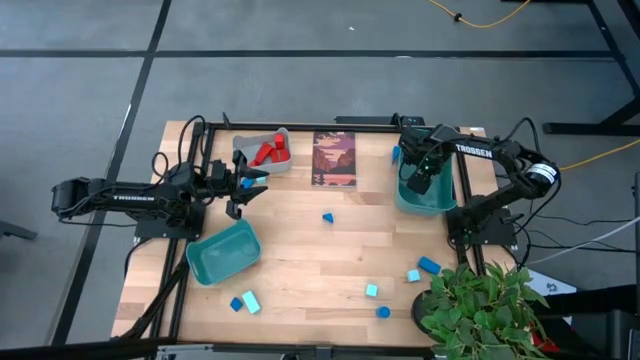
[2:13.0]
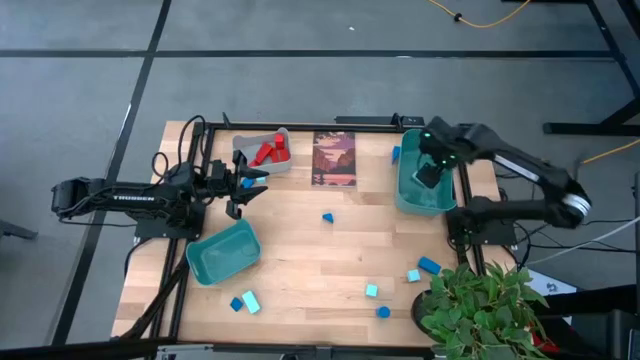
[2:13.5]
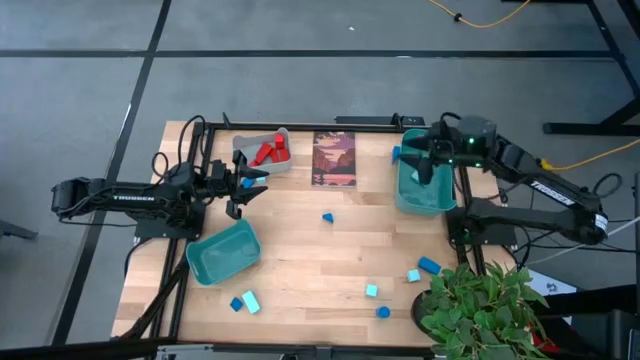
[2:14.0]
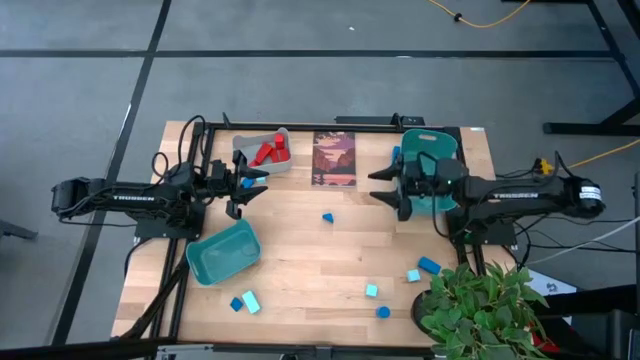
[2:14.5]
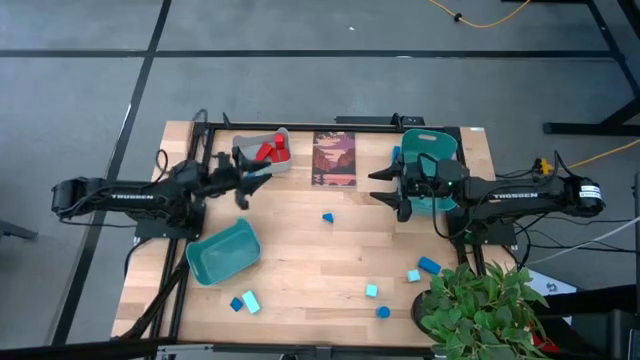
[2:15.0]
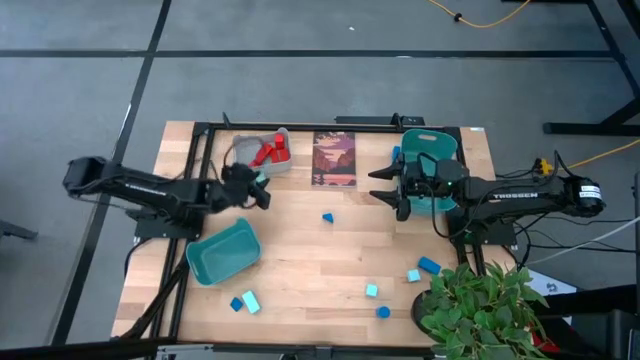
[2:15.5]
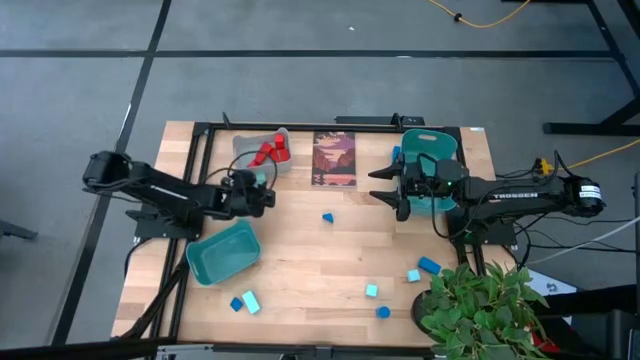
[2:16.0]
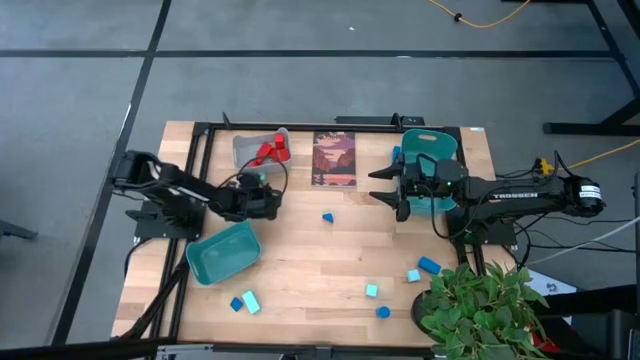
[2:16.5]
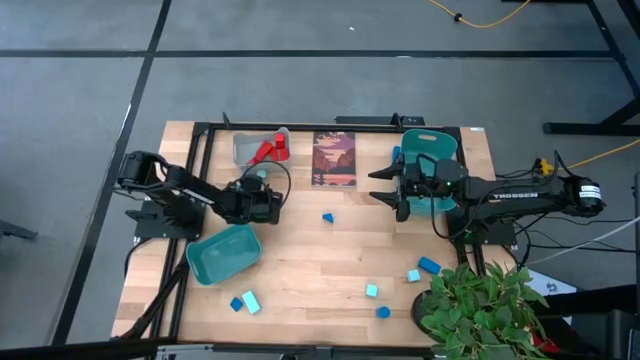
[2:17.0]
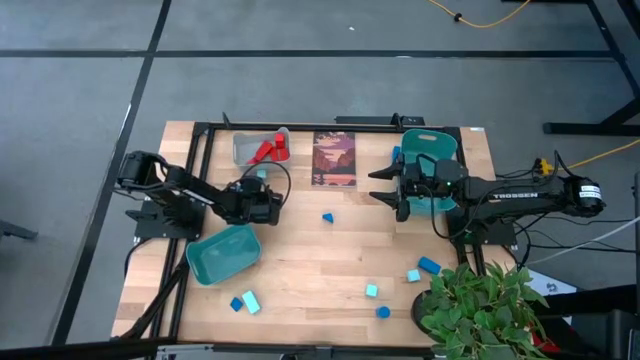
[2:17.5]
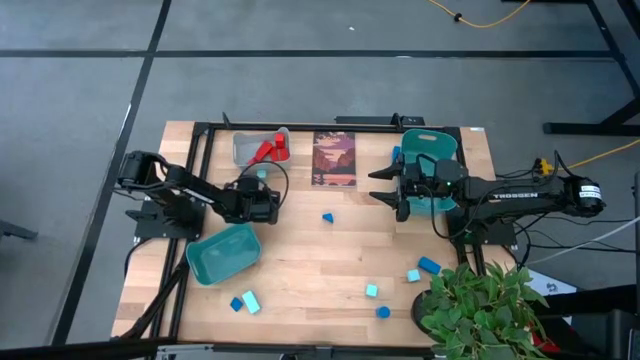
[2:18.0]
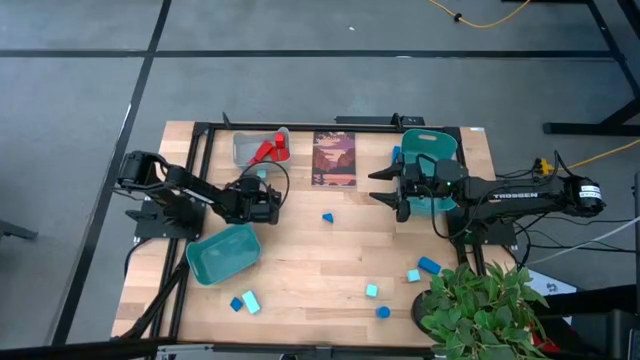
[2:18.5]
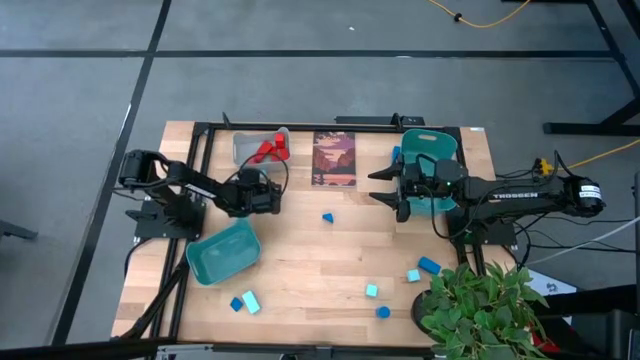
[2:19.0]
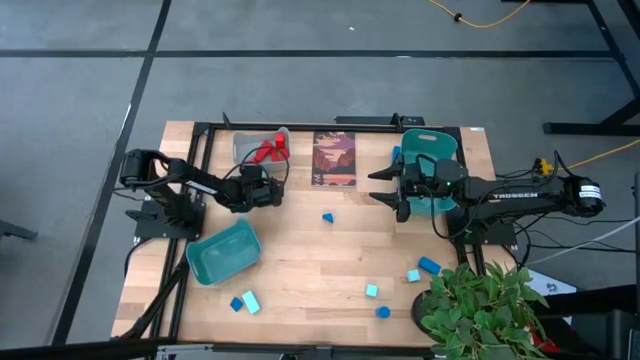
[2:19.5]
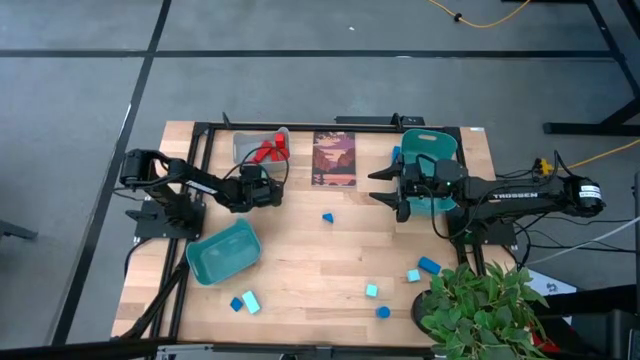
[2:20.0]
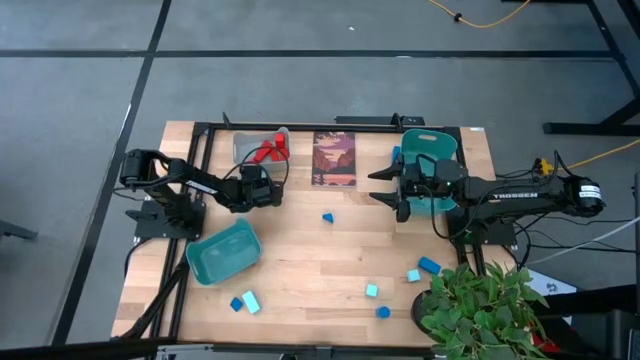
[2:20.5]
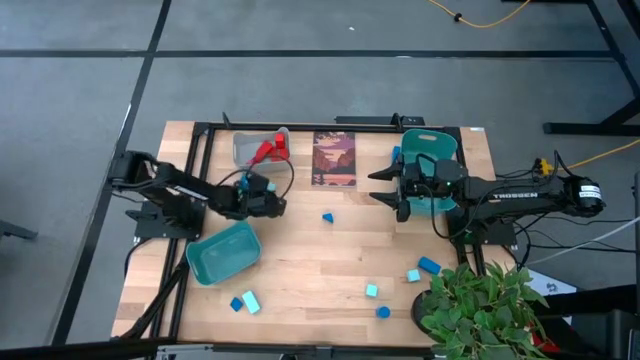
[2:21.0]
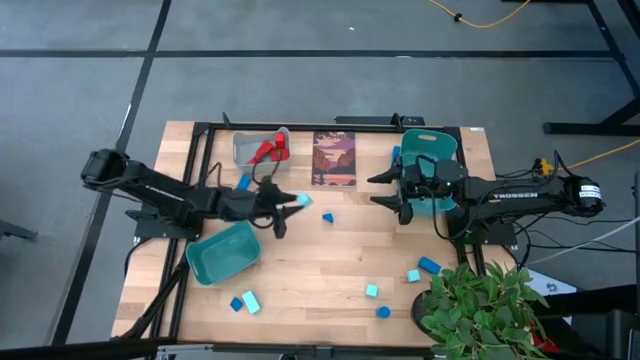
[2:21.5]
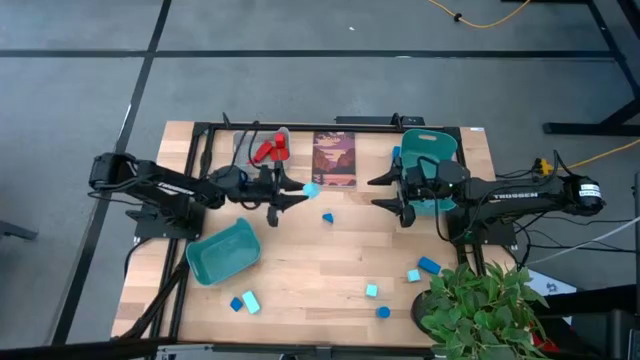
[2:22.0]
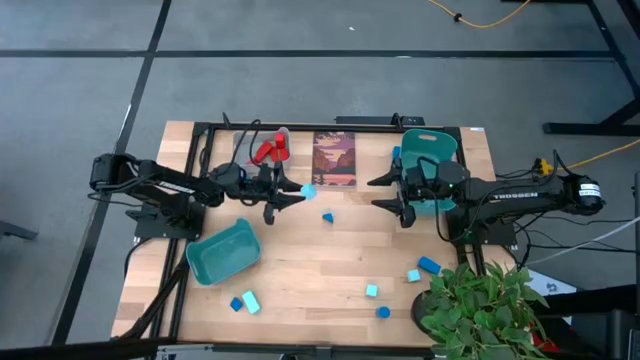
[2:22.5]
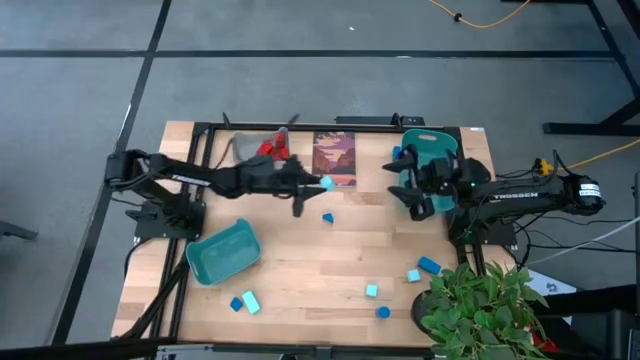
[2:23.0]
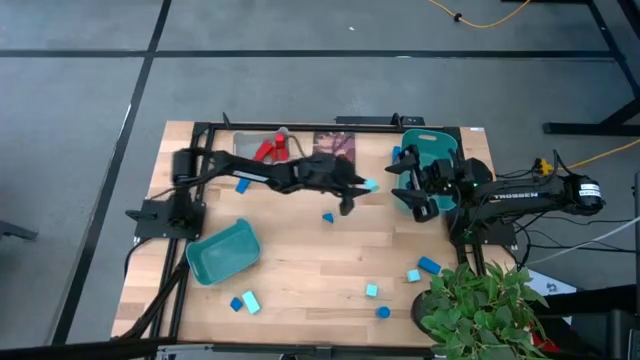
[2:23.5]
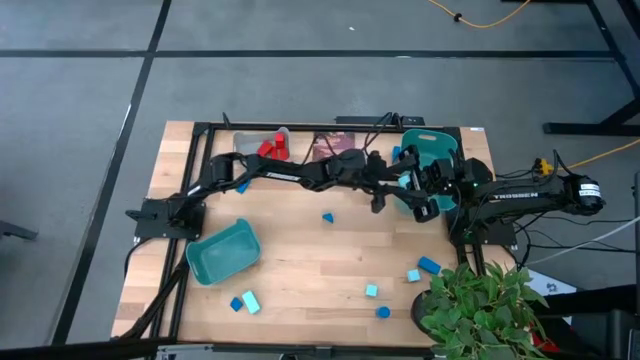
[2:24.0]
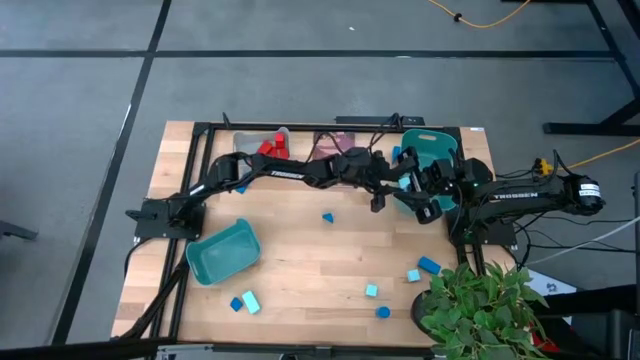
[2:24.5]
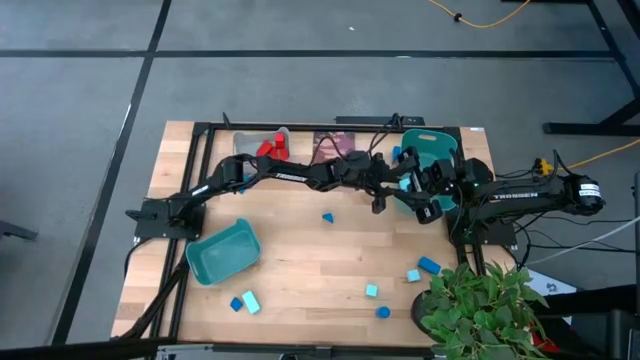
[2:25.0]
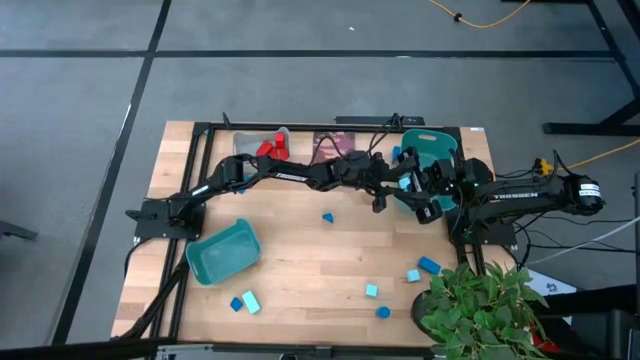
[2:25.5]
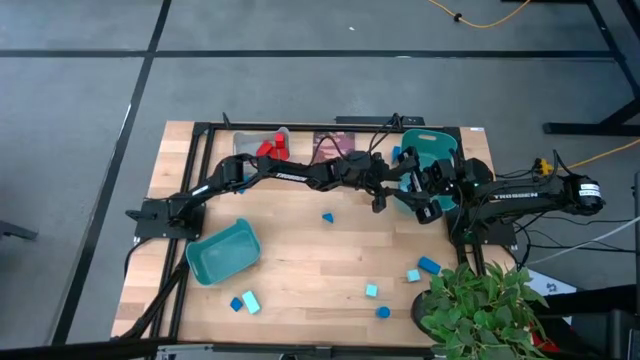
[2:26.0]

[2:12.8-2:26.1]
Task: Sort & place blocks by color
Put the light blue block into the right green bin

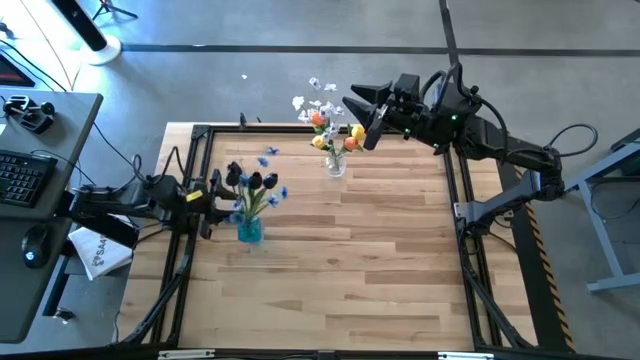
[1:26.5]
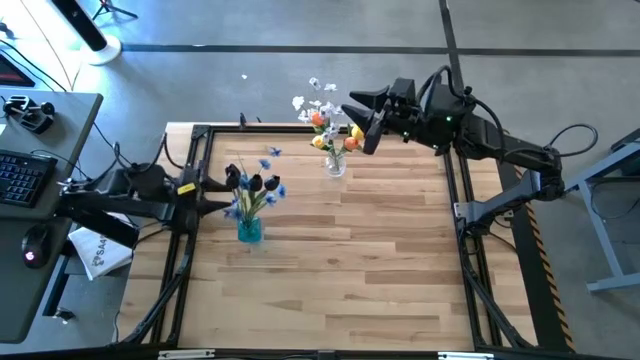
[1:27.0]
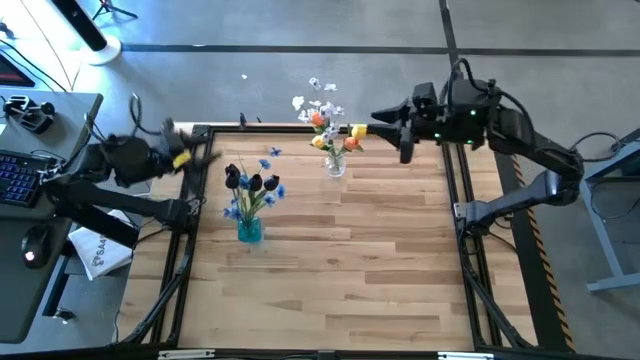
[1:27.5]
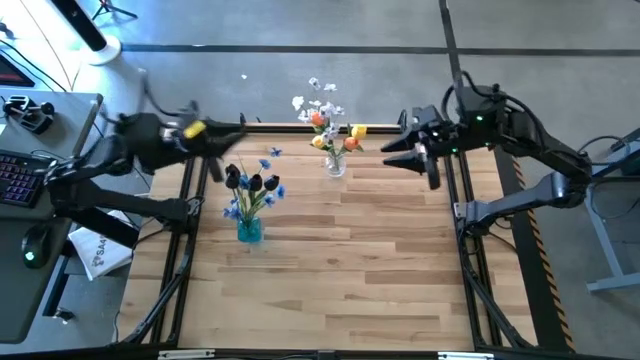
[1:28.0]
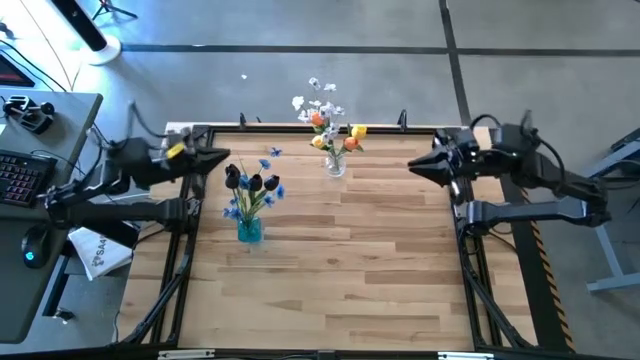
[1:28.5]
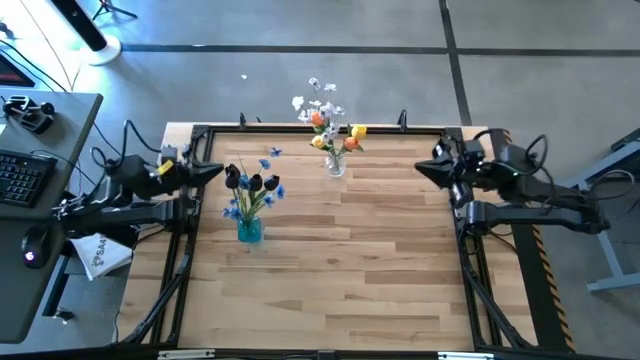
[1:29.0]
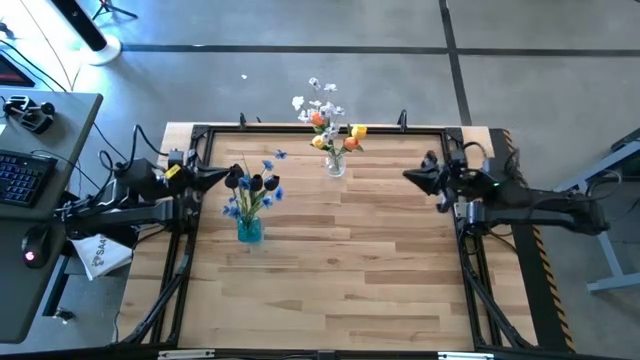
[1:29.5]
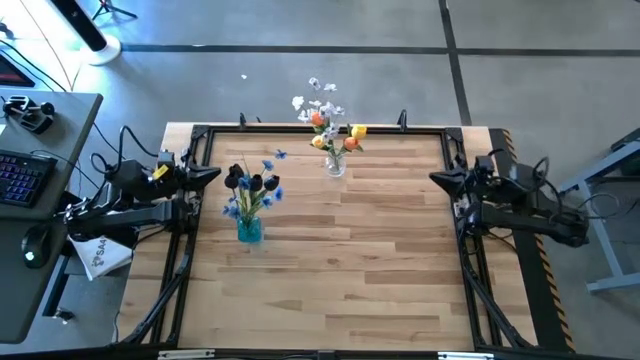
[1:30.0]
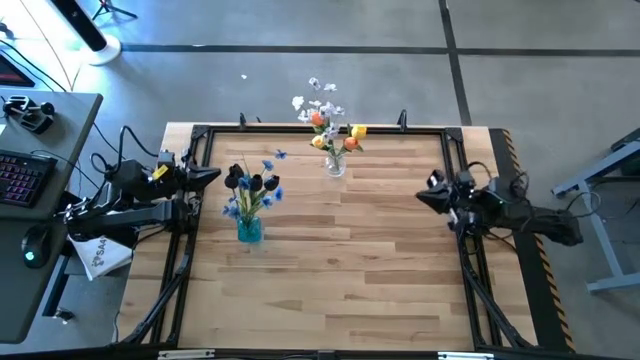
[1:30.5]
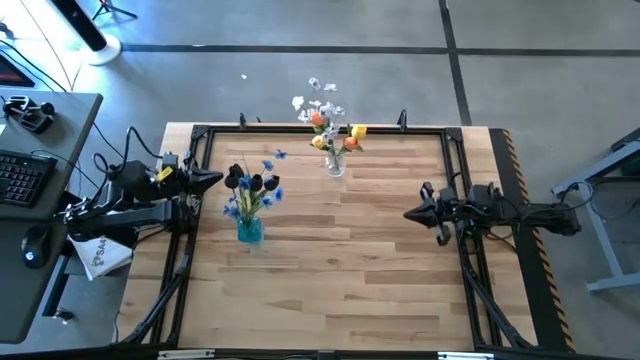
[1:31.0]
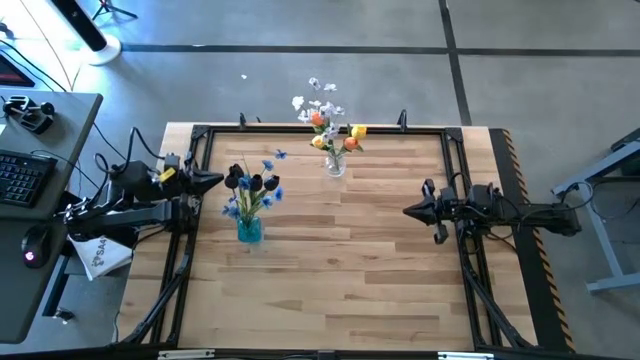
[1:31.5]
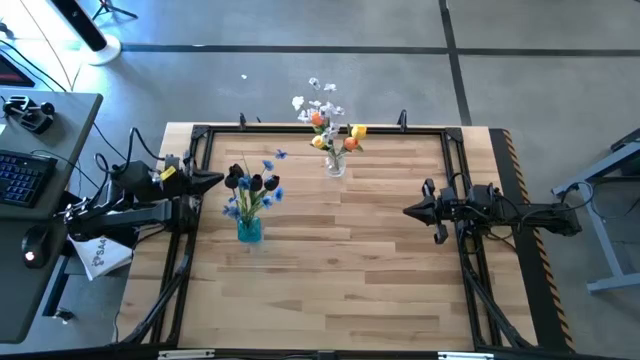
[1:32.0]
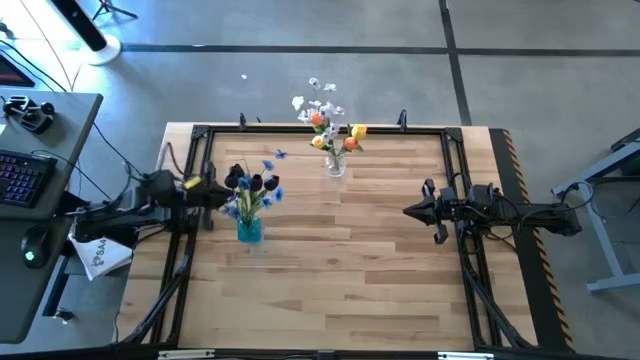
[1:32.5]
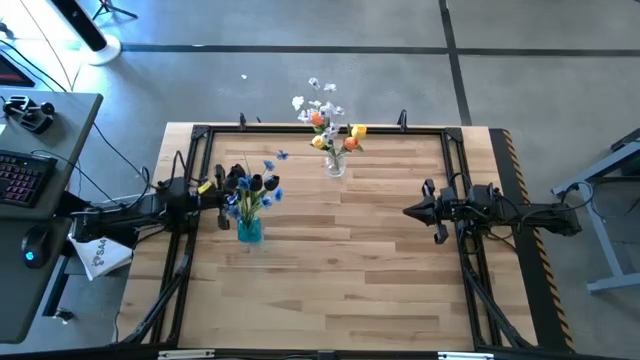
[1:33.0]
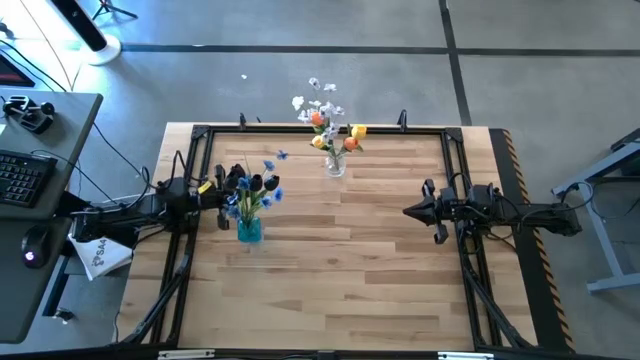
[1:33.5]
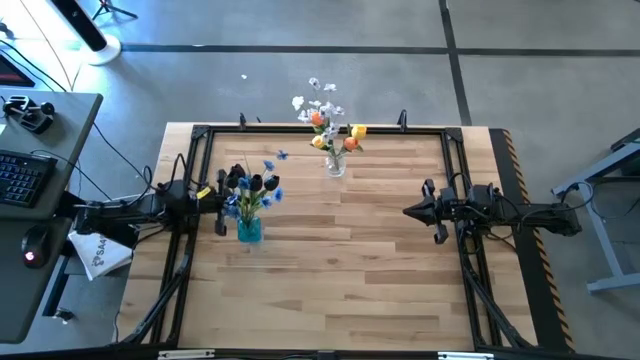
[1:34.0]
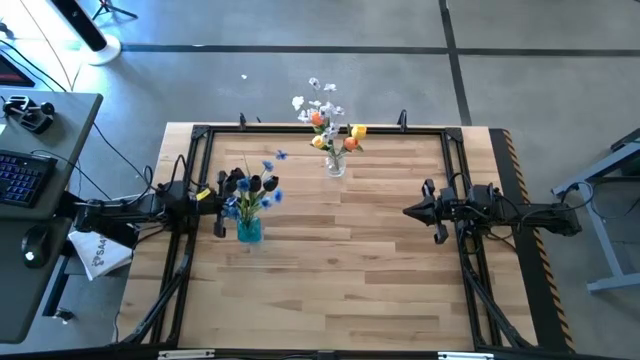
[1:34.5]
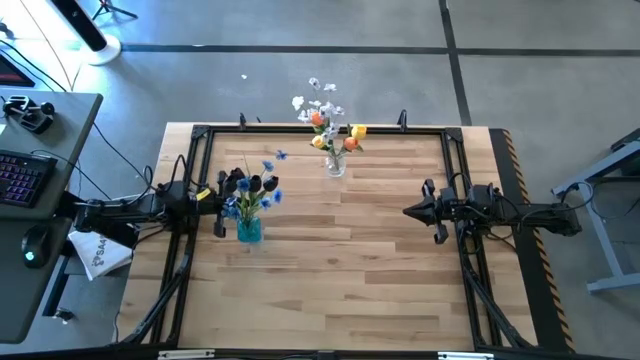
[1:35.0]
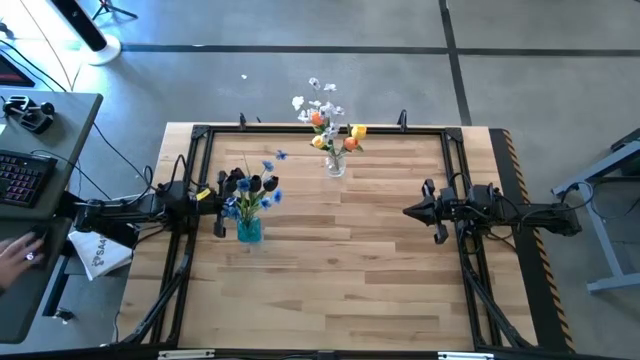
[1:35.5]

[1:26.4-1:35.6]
Task: Sort flowers into vase by color
Return to Home Position
